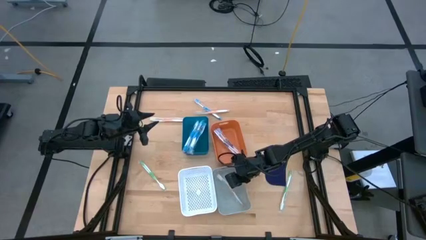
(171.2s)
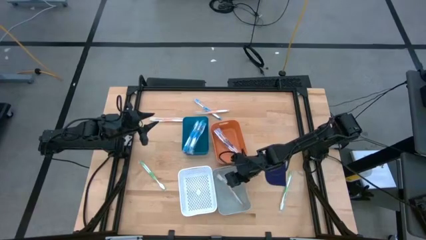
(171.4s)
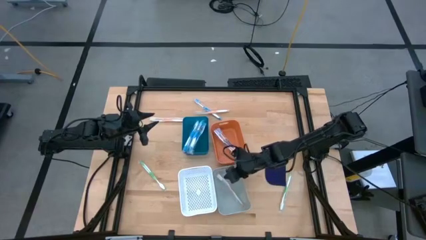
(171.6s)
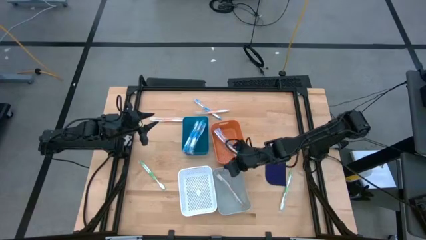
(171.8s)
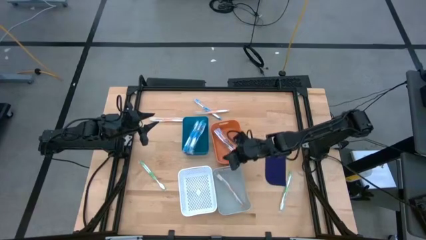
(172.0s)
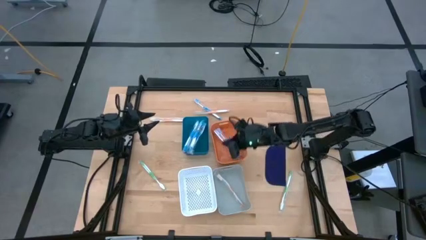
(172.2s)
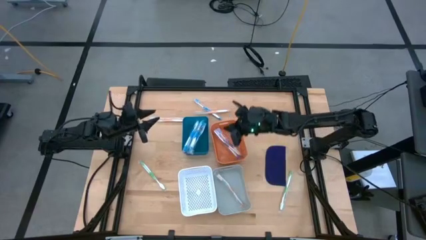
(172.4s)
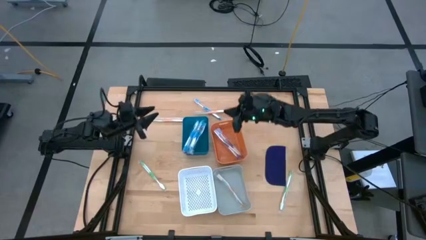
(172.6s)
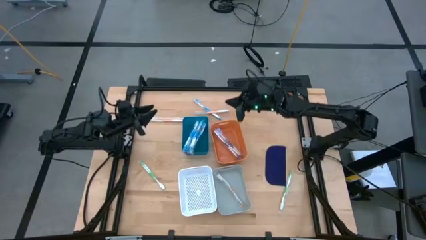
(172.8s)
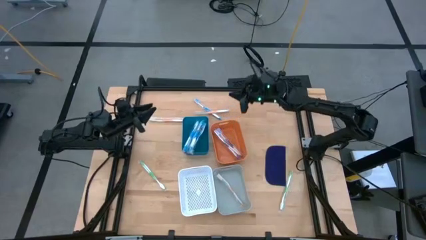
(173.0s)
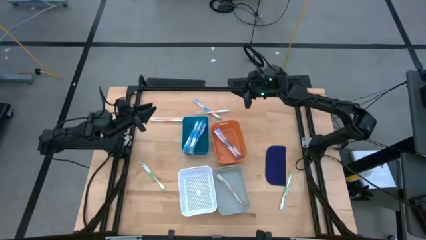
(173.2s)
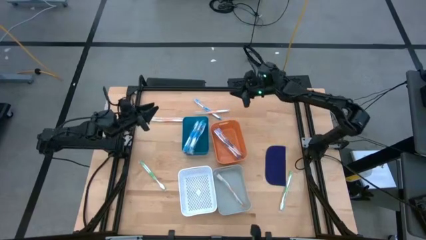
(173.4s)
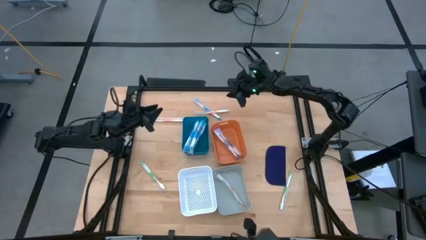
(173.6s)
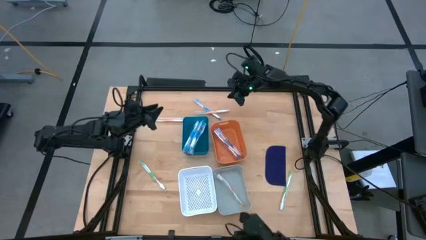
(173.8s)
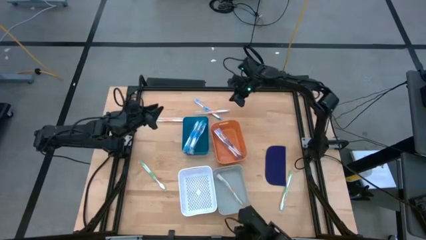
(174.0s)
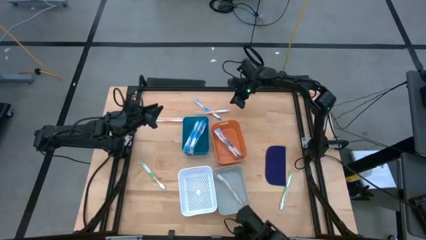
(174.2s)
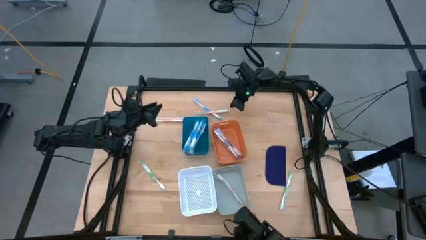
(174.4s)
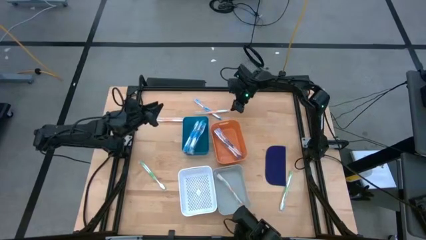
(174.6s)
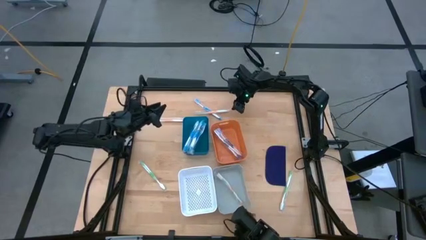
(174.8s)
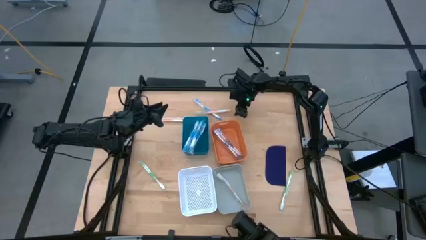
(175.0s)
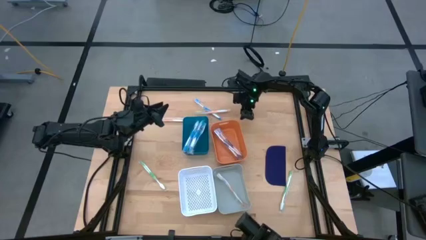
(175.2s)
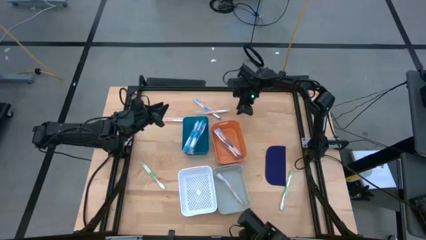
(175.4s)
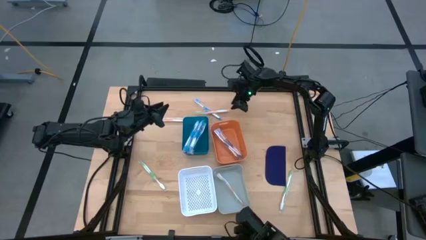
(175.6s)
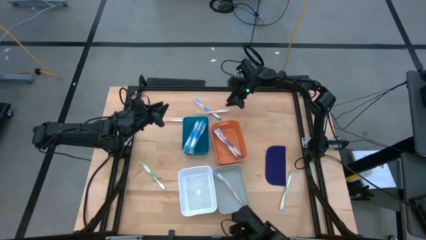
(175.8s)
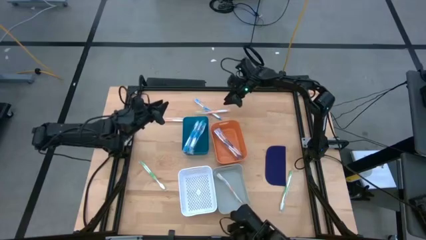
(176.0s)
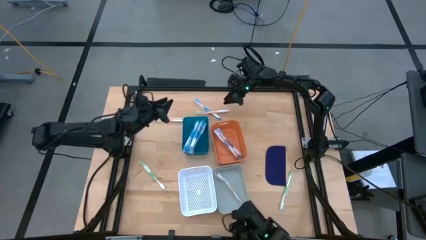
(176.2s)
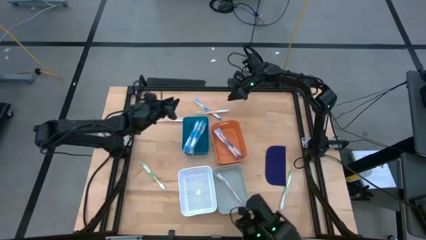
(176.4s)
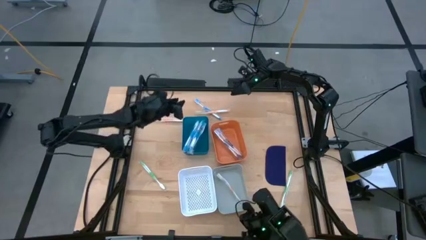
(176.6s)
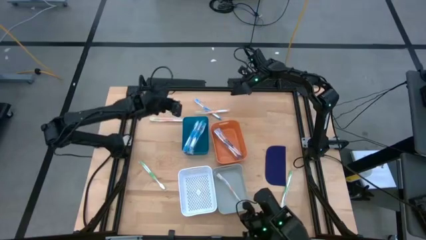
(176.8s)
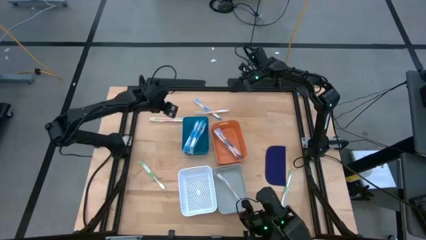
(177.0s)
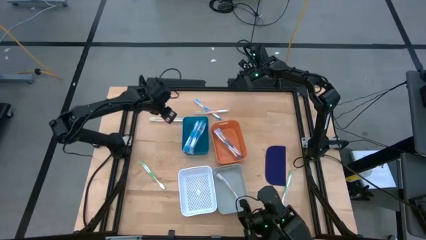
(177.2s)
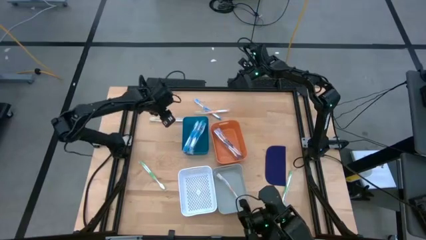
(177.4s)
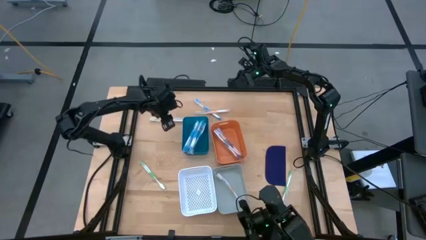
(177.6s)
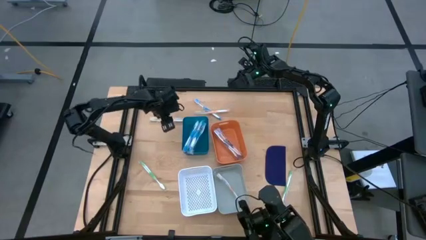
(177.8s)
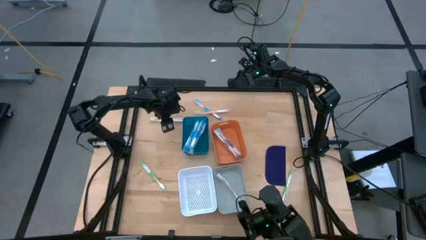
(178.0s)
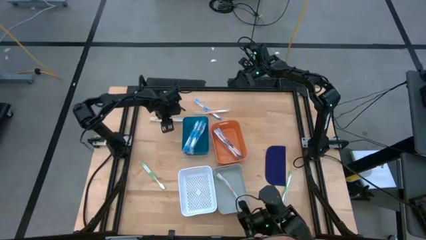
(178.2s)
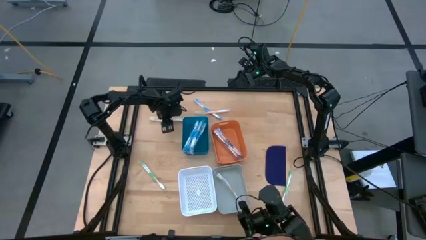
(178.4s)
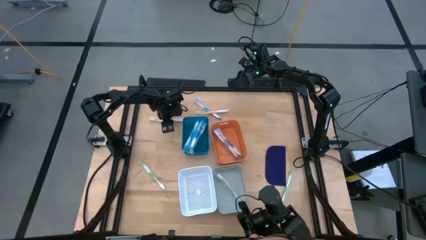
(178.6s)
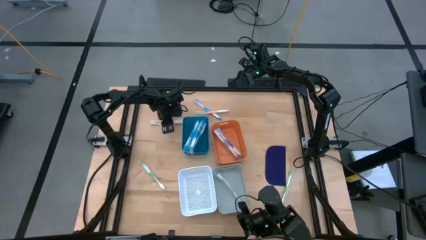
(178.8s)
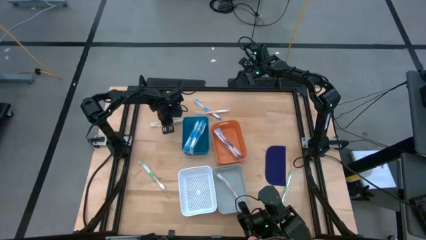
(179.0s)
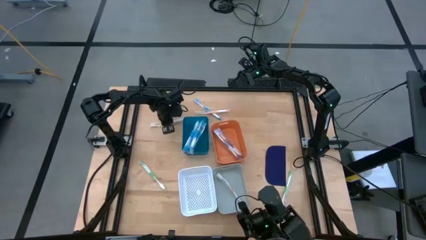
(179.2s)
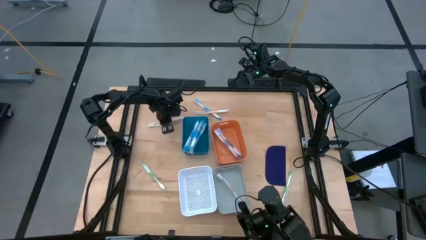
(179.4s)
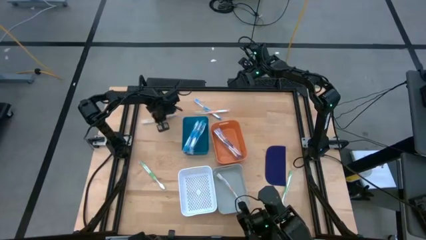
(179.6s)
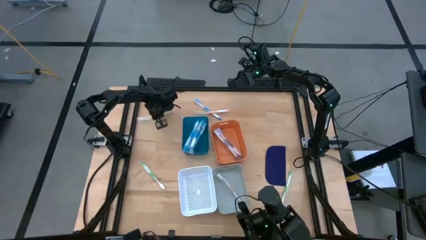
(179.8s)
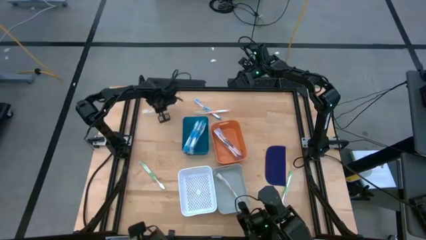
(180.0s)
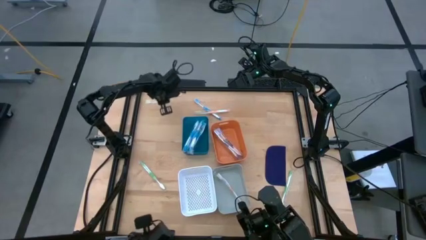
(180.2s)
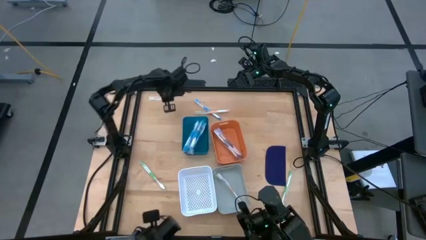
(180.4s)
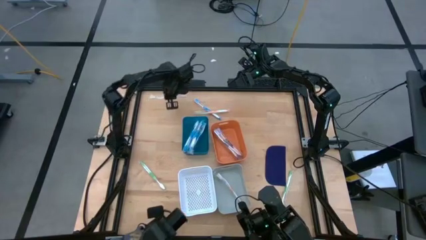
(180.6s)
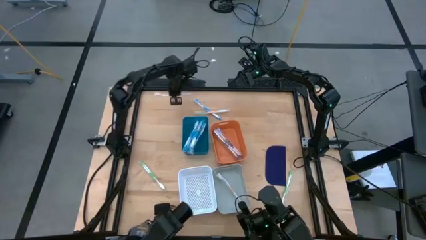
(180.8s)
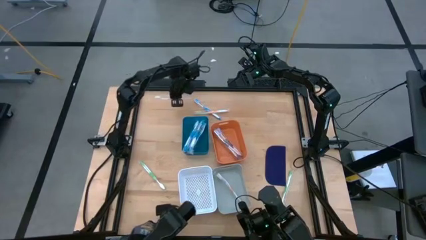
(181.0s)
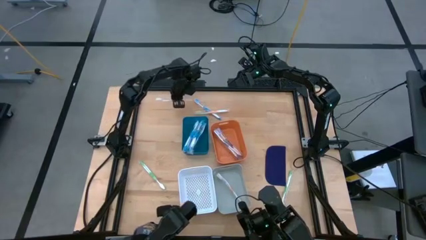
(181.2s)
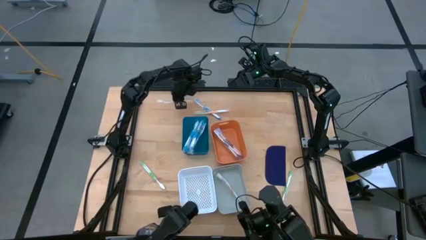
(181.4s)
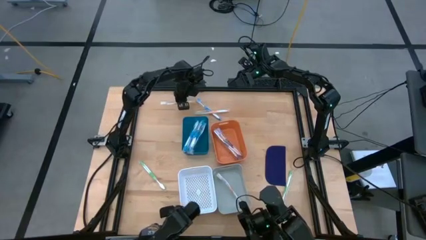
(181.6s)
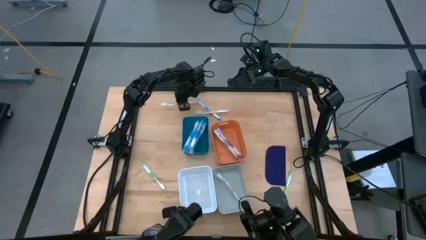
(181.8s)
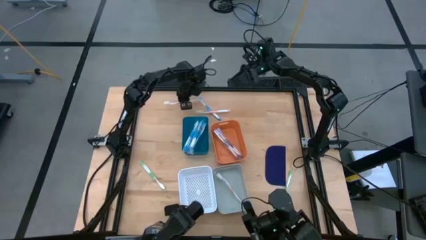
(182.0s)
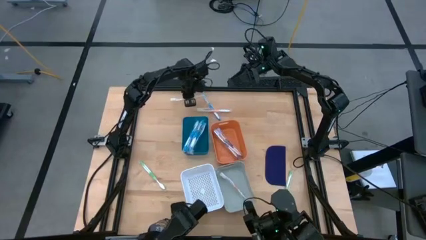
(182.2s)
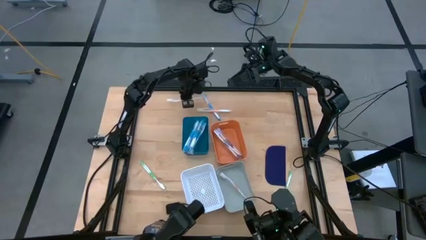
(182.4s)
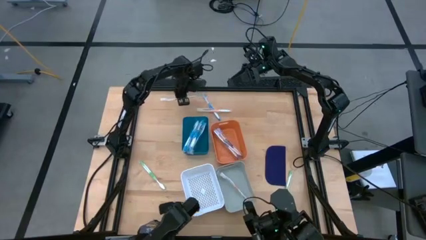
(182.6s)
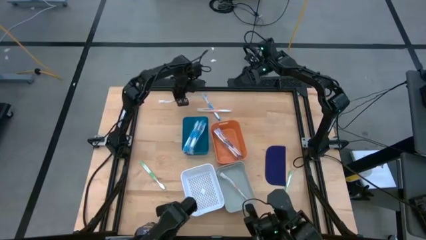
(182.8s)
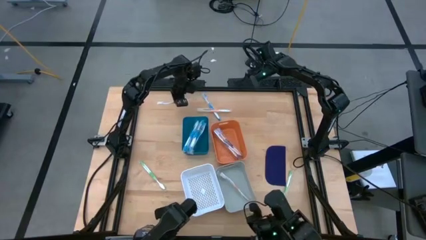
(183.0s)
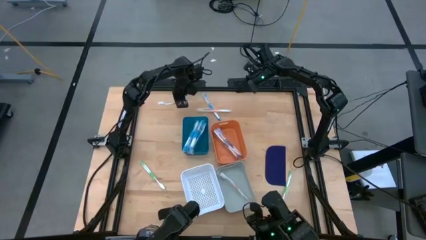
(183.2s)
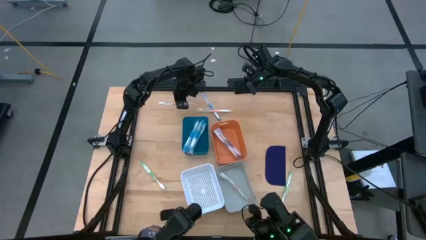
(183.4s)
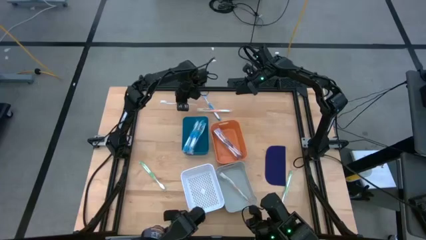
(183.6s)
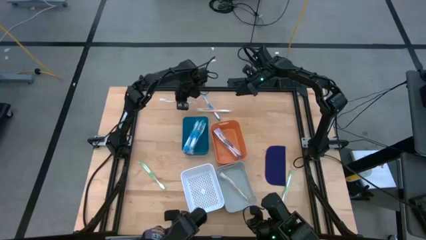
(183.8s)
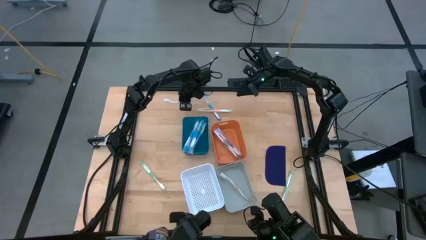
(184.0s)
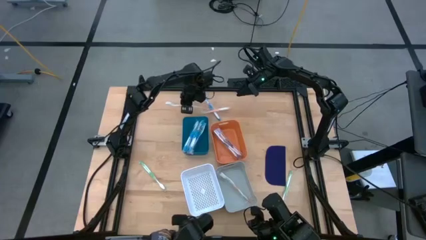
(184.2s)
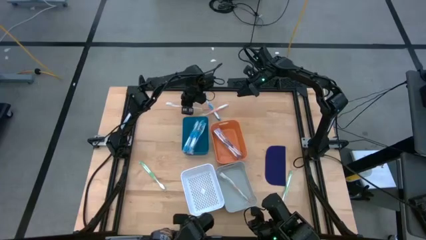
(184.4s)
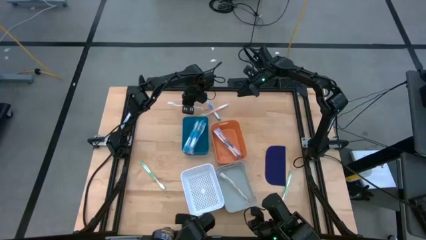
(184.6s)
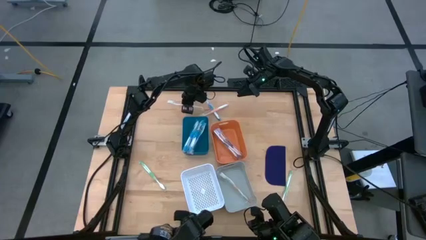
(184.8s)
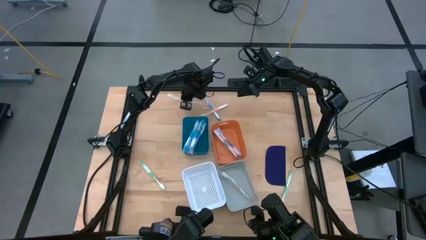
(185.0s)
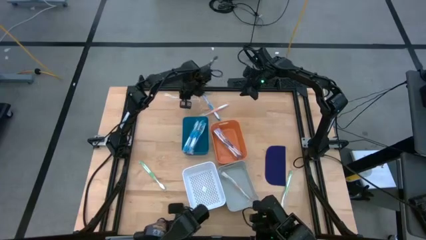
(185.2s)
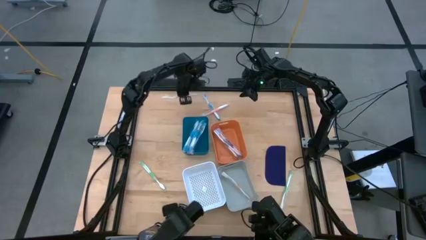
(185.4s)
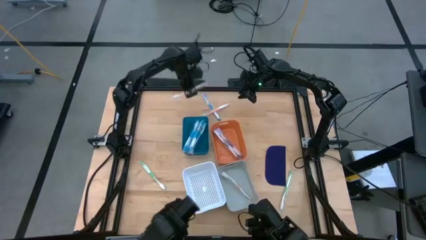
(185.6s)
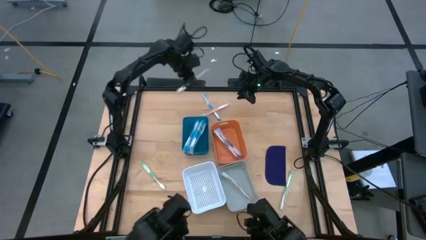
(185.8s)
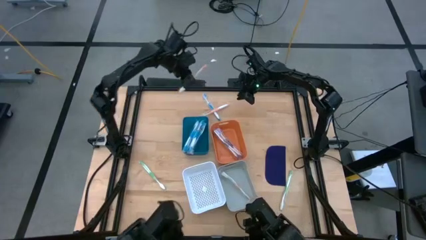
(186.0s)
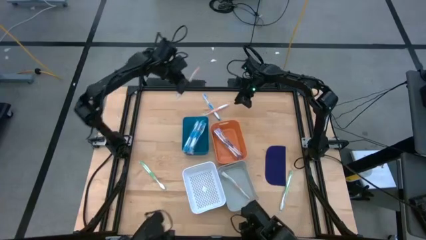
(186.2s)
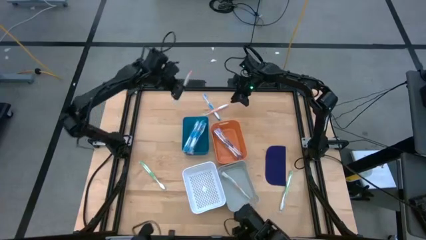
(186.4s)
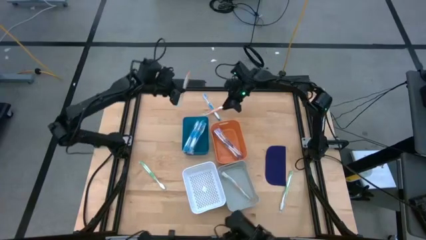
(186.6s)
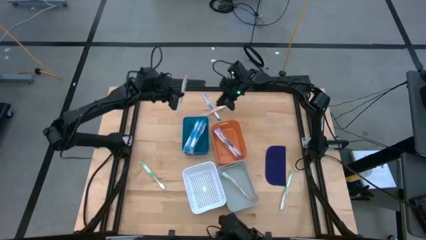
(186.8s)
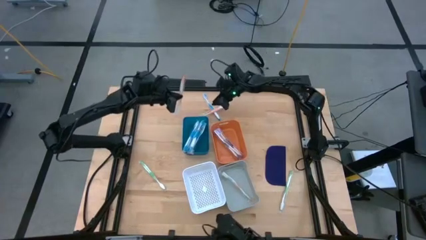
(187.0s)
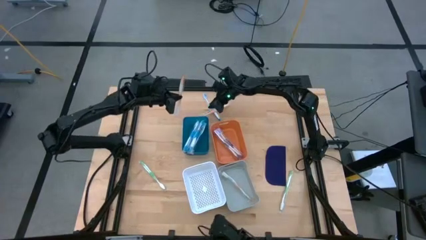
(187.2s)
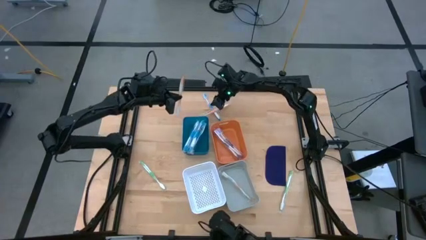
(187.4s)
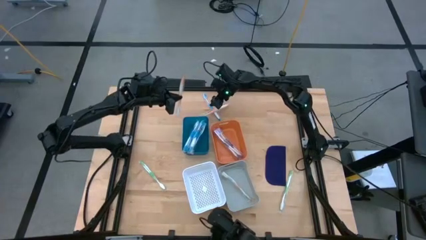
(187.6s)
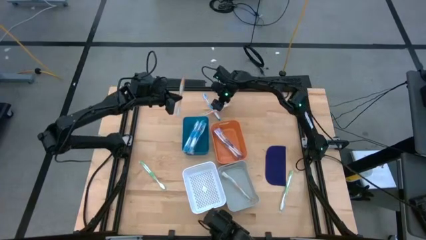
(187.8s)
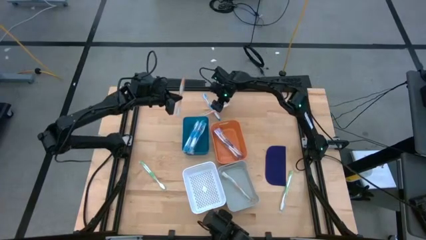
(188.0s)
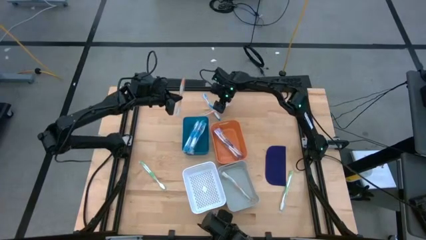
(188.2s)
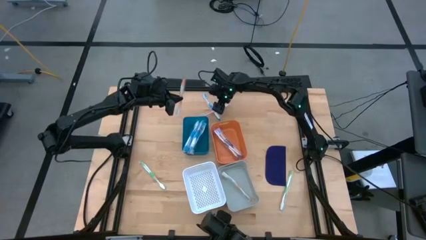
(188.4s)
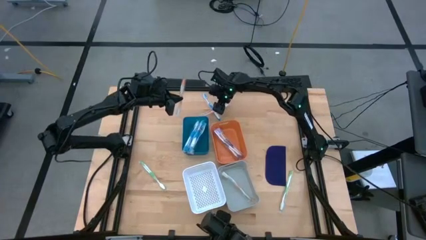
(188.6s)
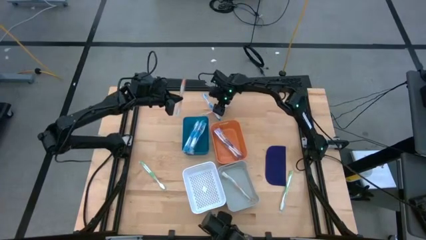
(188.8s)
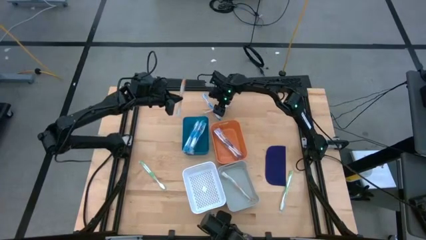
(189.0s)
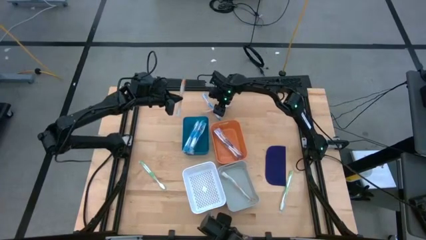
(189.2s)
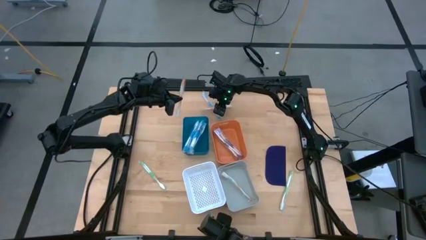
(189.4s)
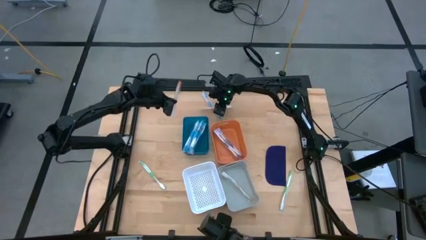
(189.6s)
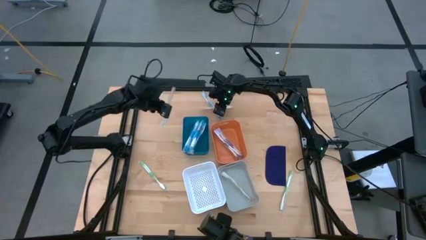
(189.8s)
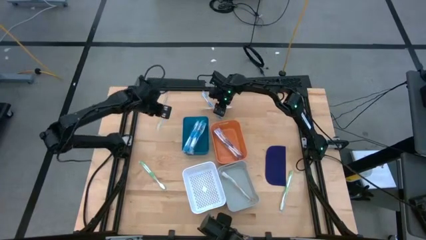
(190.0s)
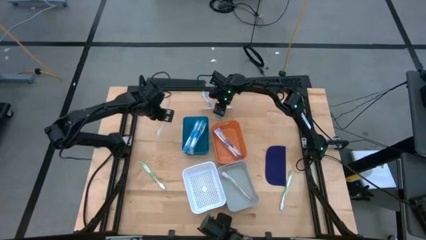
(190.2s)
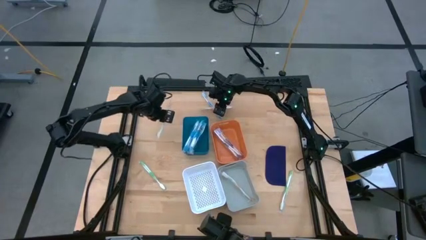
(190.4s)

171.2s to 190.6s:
Task: Pick & Place Toothbrushes
Put the orange toothbrush into the gray bin
